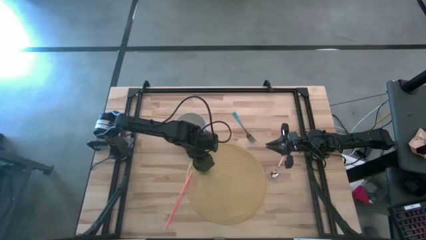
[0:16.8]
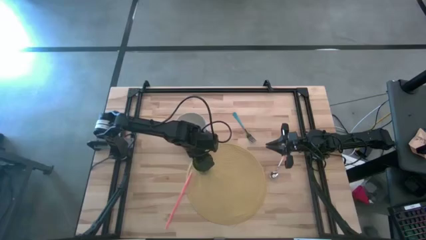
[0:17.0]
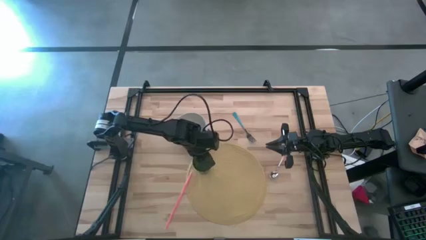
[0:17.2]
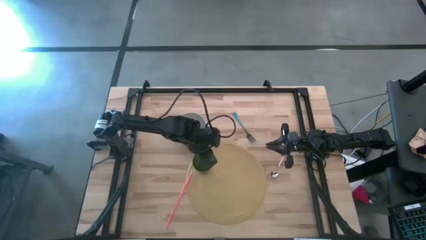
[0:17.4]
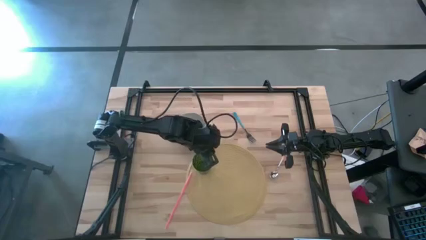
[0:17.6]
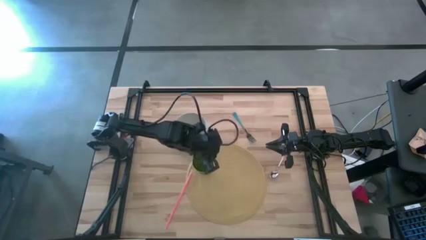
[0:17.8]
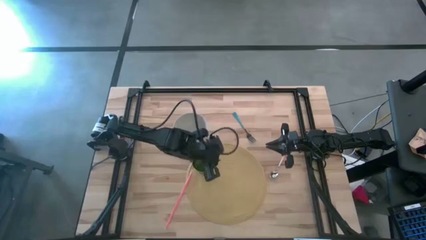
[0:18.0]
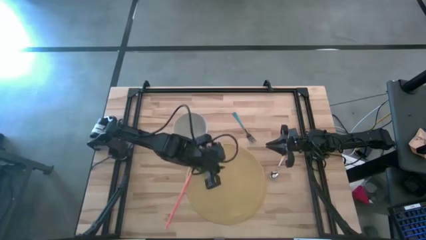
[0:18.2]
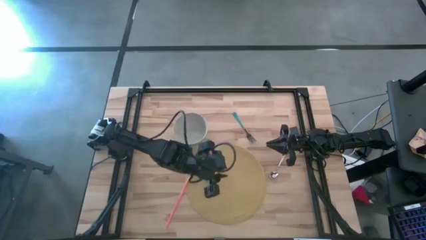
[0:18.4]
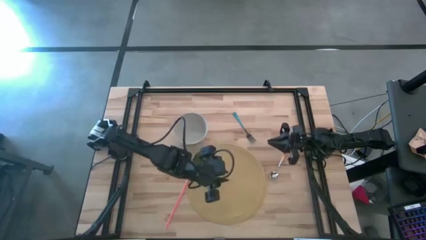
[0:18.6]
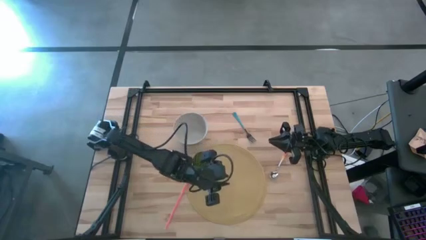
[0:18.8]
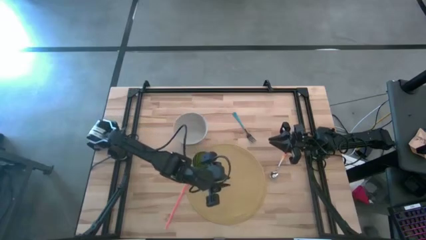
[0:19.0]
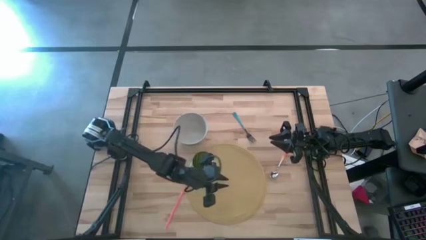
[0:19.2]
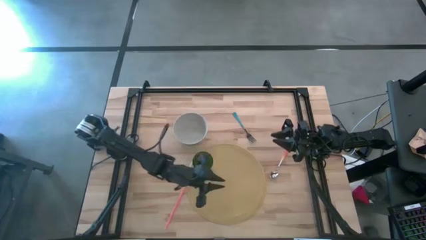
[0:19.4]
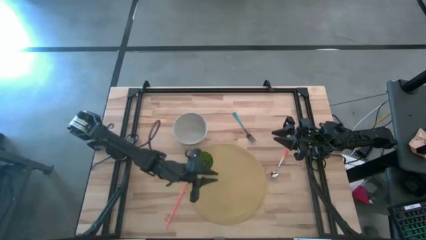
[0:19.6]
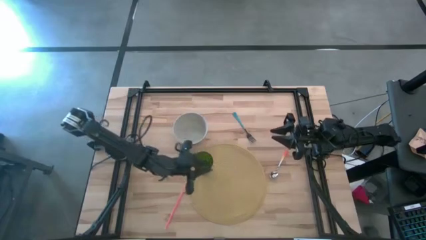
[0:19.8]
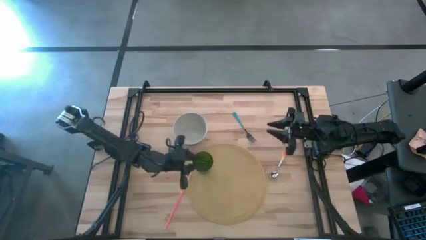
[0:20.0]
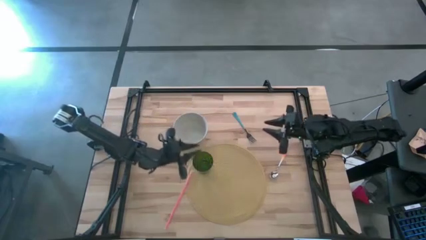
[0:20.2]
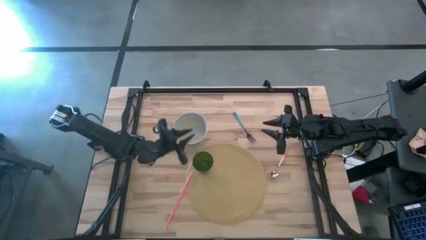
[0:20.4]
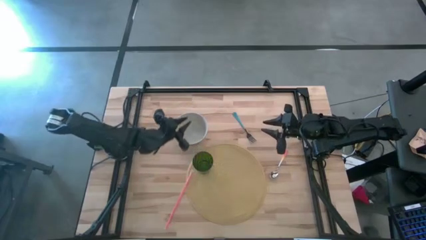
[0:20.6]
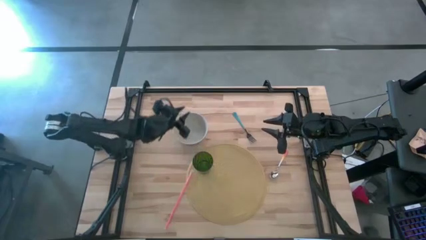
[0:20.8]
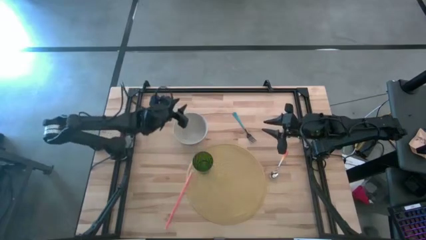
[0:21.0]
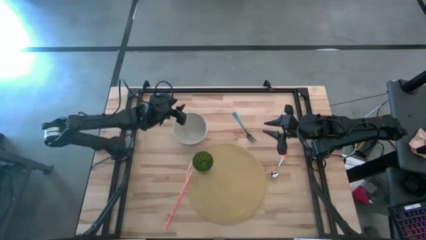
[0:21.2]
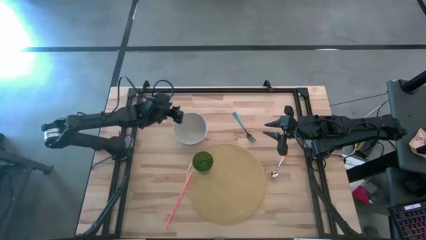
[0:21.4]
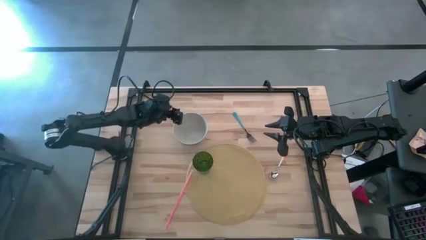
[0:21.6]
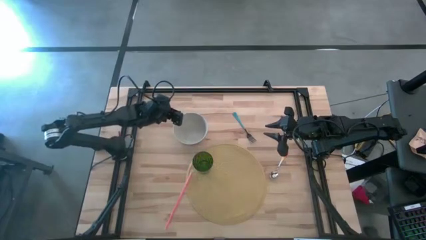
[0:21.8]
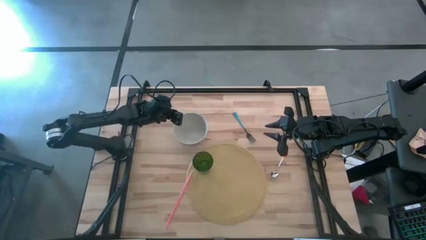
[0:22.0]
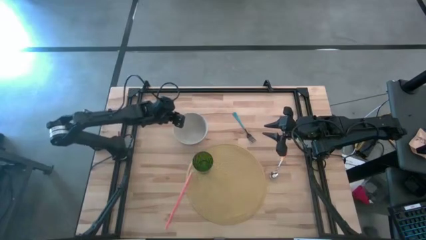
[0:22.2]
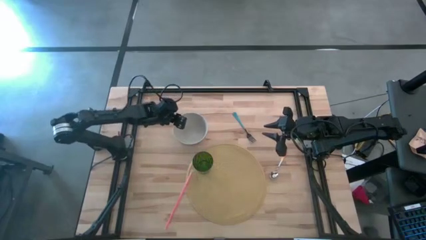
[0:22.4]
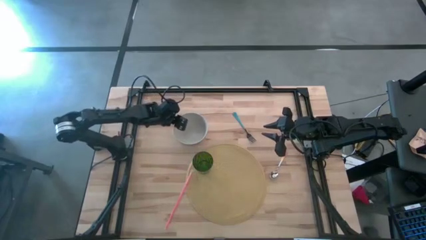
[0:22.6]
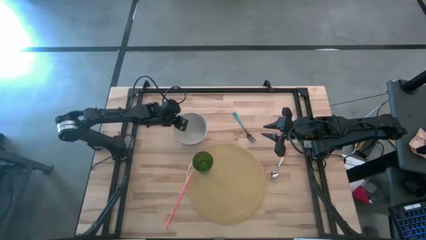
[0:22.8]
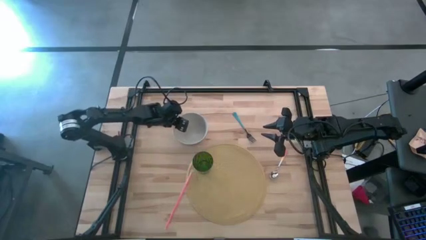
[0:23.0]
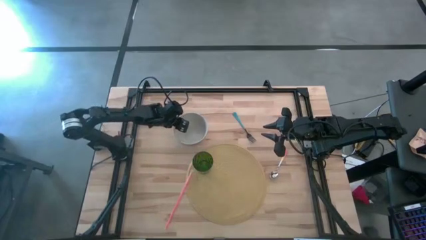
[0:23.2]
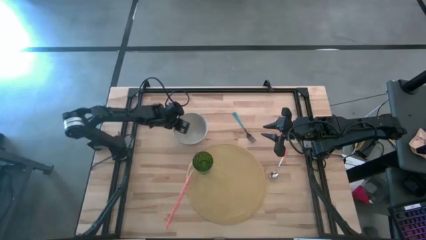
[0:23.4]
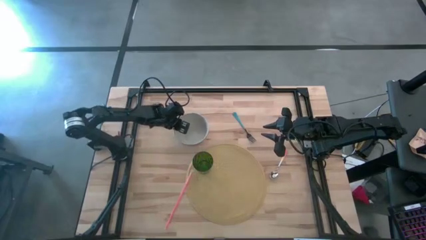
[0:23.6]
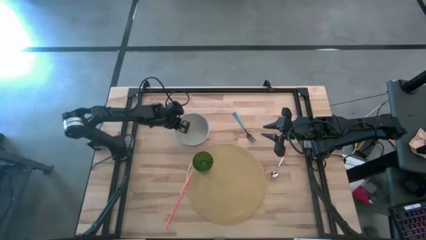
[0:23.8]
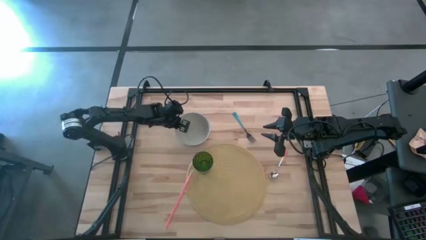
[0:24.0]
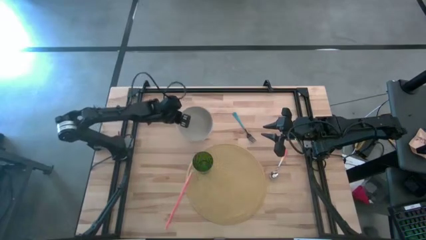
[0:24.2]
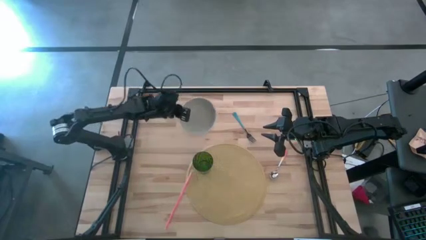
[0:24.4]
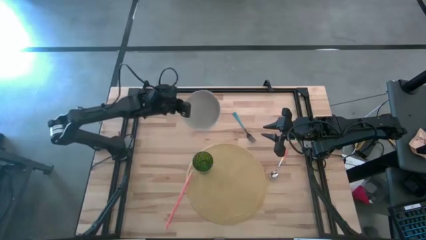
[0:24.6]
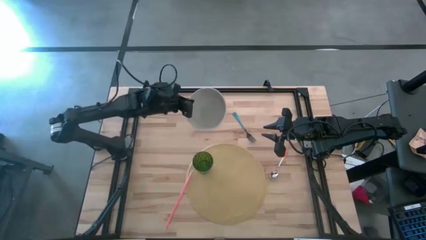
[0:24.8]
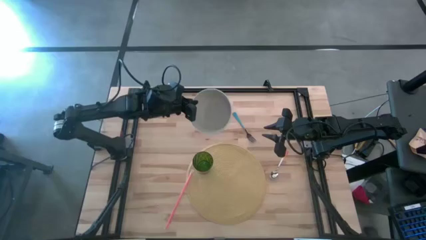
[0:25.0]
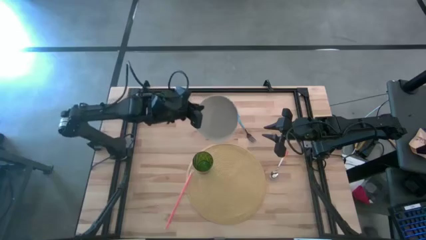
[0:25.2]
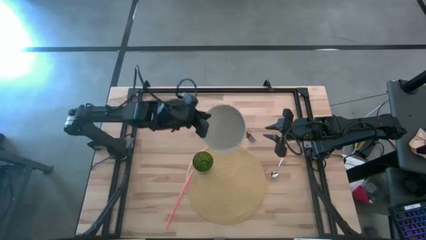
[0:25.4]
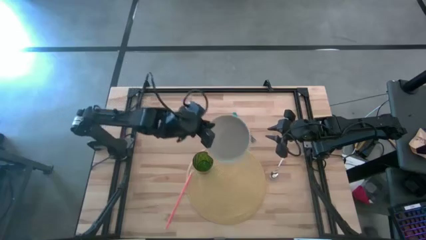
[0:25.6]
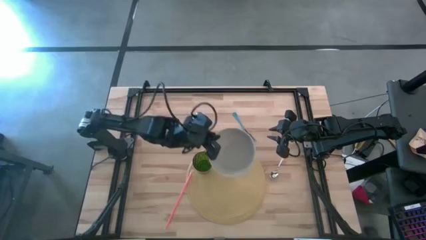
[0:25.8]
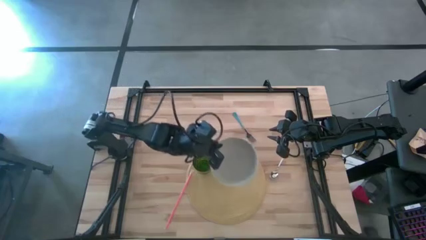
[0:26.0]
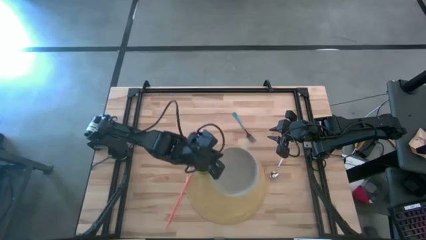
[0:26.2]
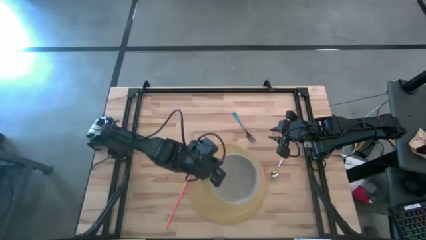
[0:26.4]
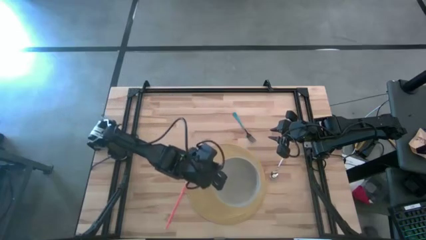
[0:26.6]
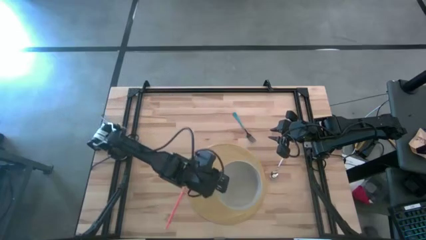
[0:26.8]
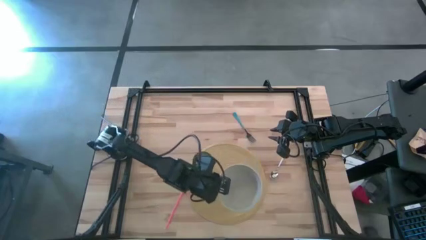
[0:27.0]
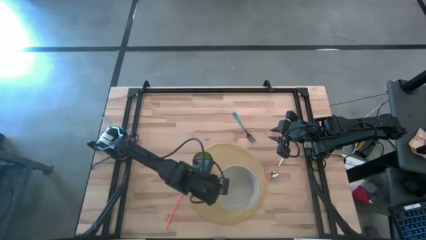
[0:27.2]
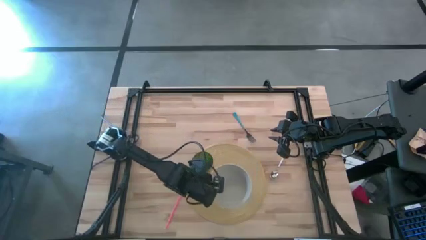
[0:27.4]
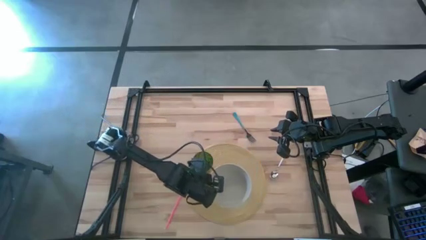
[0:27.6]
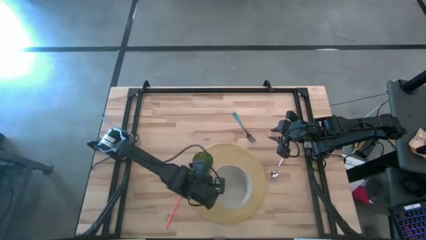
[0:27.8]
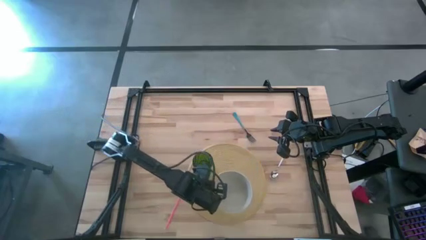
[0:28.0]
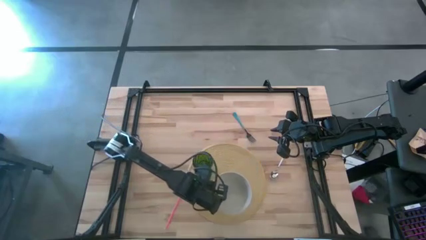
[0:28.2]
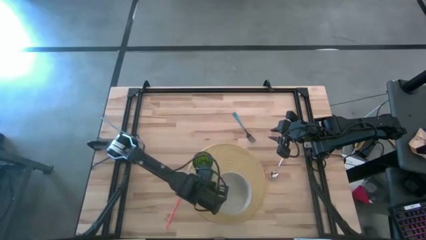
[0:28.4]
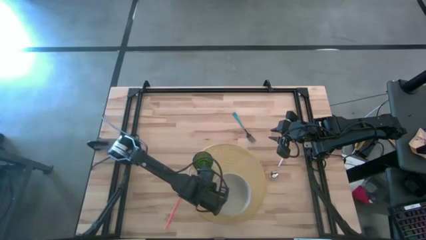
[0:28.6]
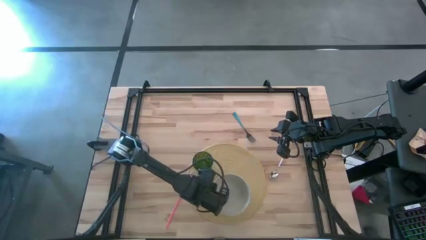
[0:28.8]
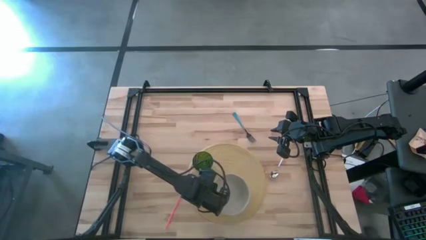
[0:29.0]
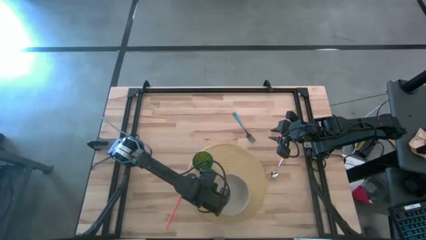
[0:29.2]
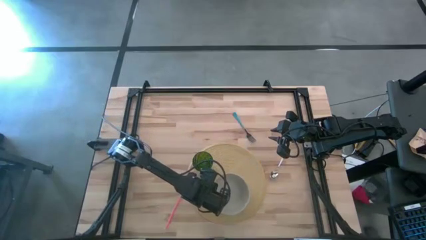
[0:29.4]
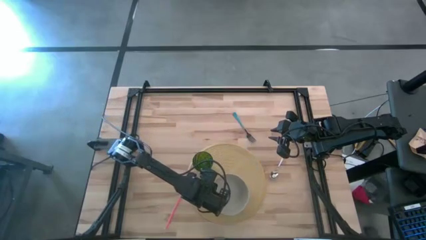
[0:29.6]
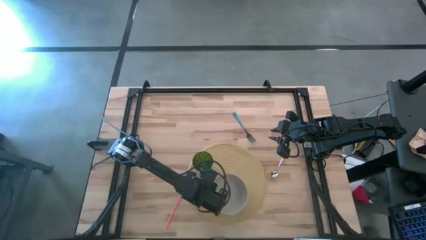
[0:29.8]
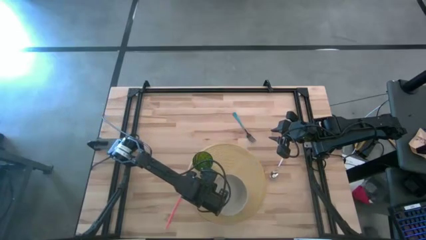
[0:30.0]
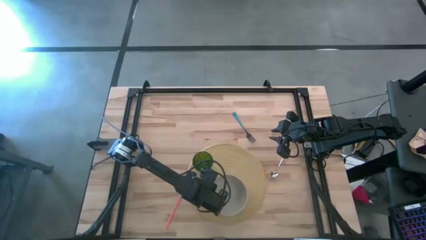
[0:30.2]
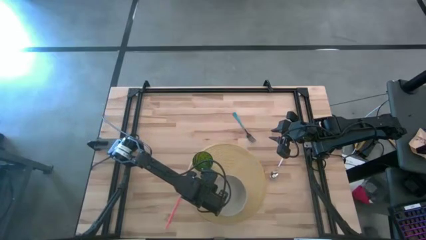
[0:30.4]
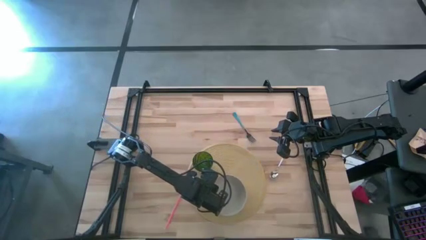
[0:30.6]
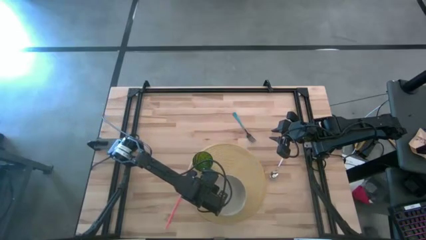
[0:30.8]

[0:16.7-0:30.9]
Task: Pick & Place Utensil
Put the white bowl on the brown mat to the bottom right of the green cup
